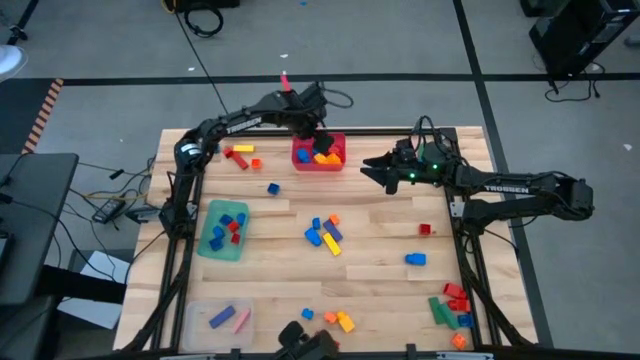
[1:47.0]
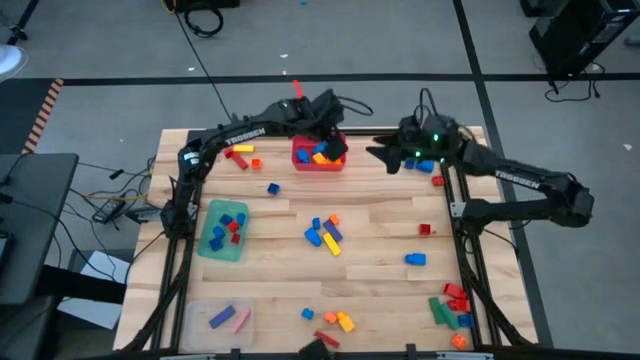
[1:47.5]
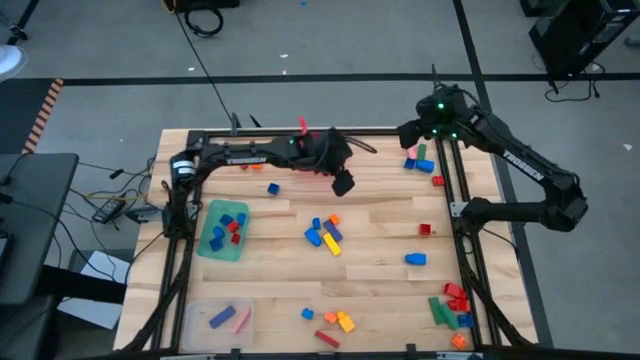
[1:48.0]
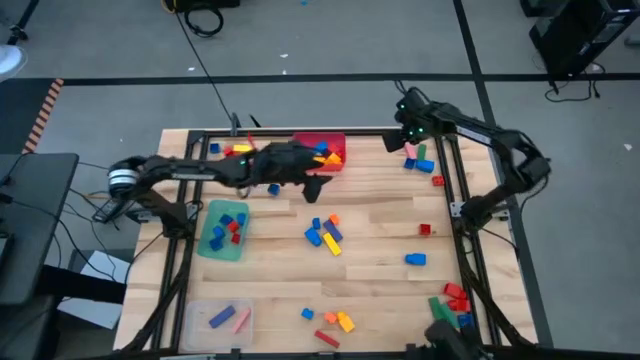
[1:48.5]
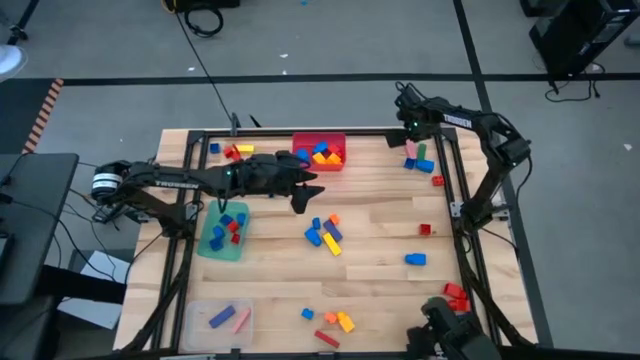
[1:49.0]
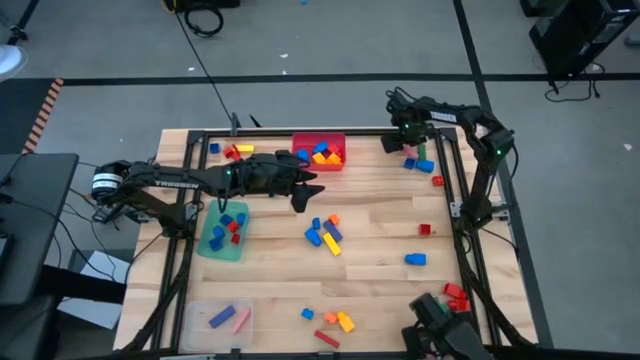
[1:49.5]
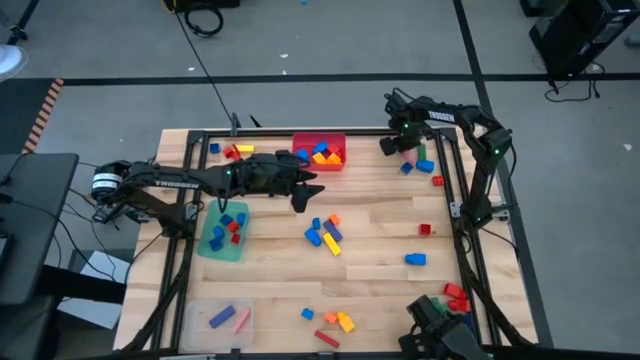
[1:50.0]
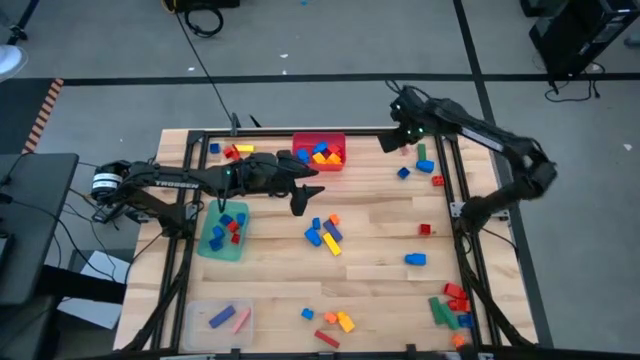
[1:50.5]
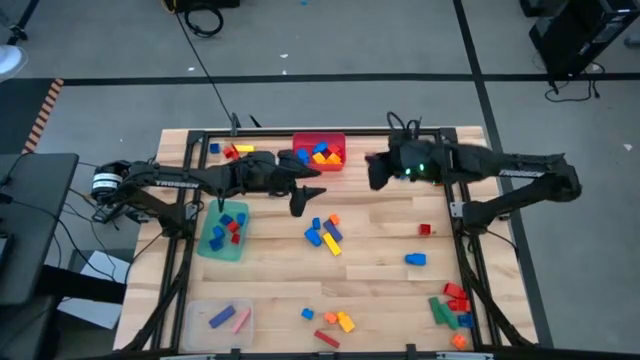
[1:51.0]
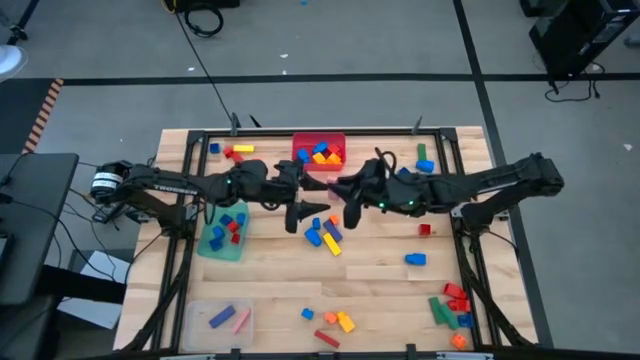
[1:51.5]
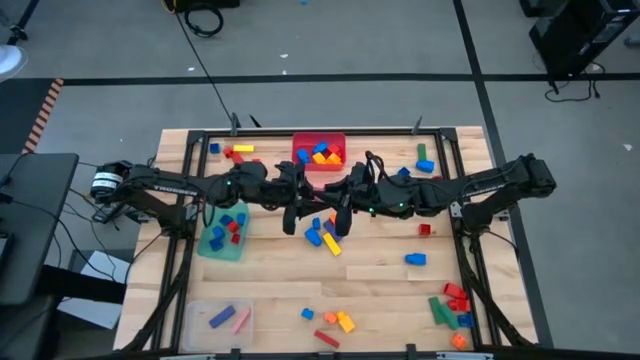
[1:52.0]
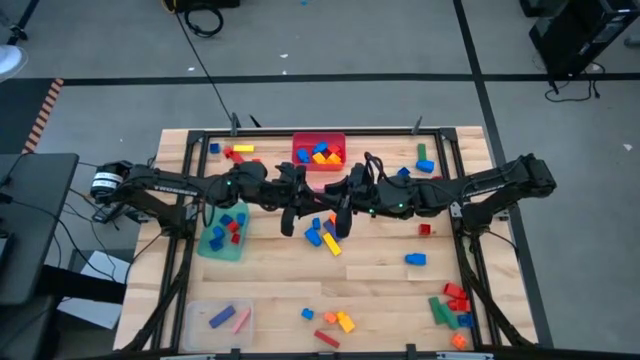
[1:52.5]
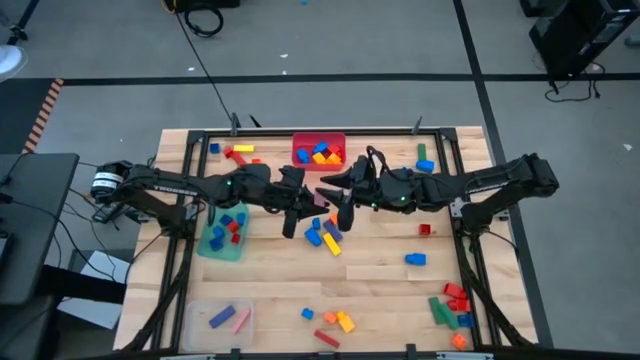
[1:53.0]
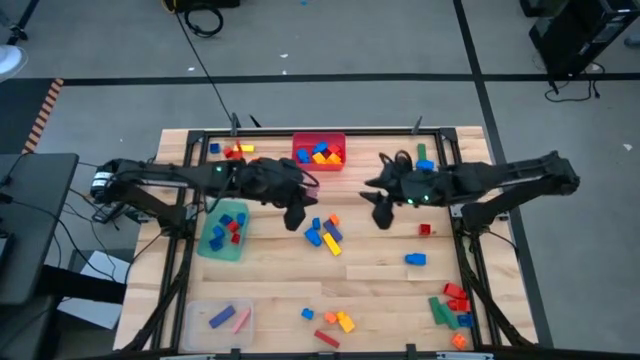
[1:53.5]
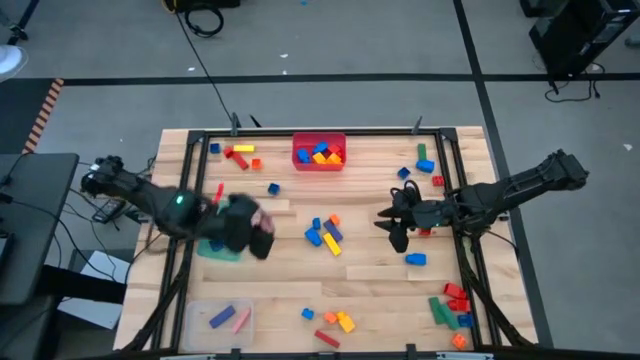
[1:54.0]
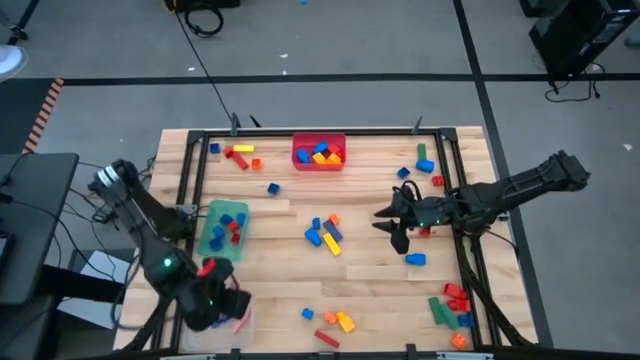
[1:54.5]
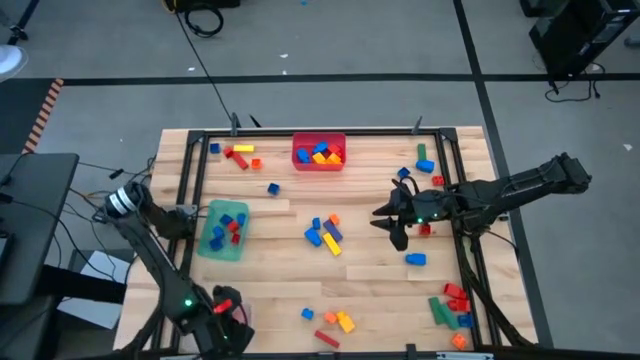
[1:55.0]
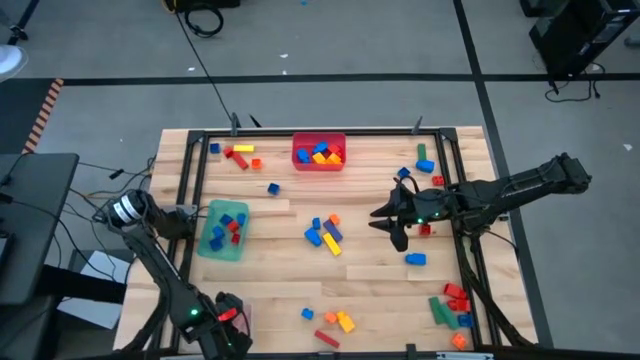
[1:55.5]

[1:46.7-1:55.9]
Task: Sort blocks by size
Put the pink rectangle block into the transparent bin

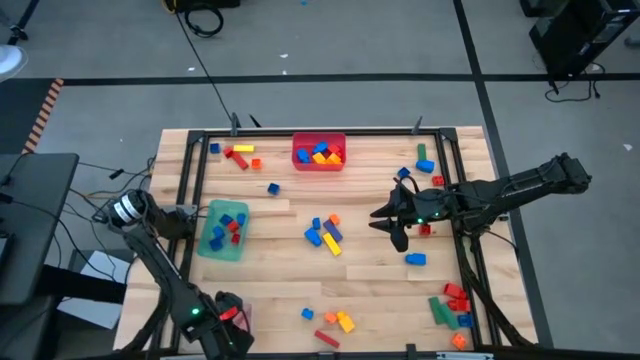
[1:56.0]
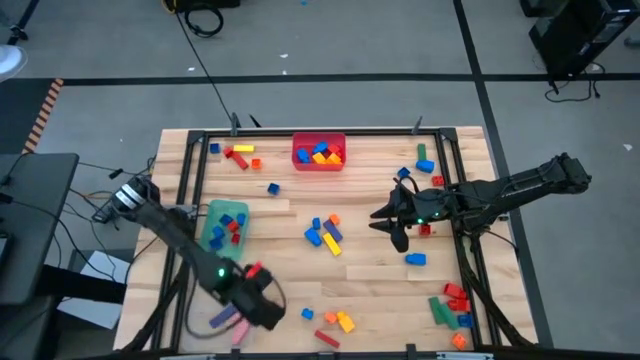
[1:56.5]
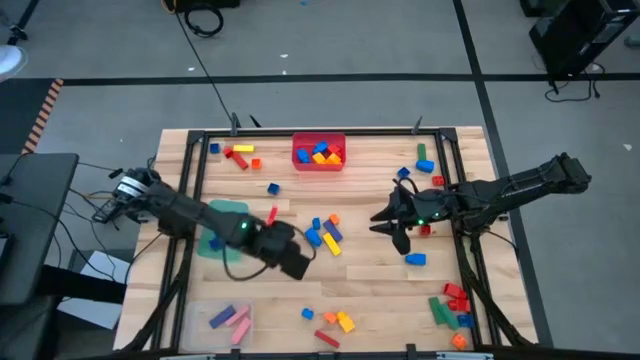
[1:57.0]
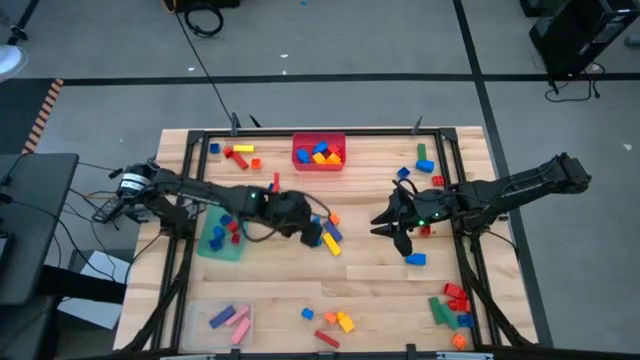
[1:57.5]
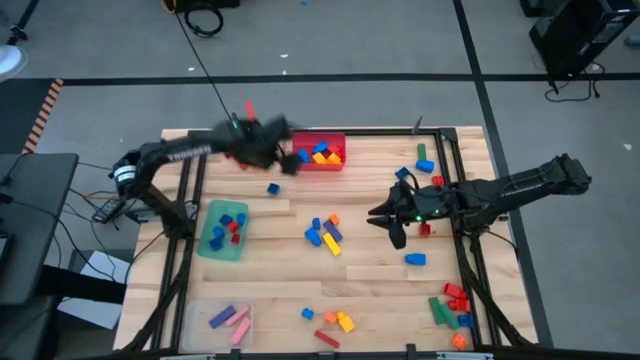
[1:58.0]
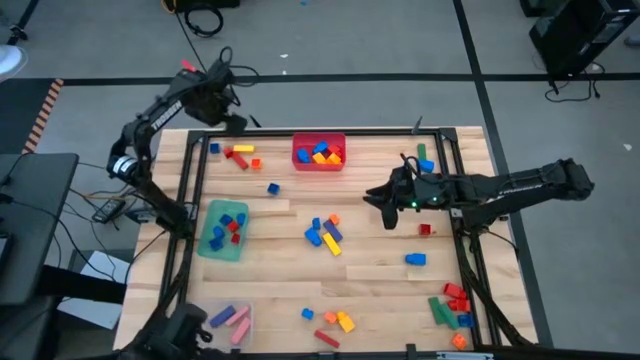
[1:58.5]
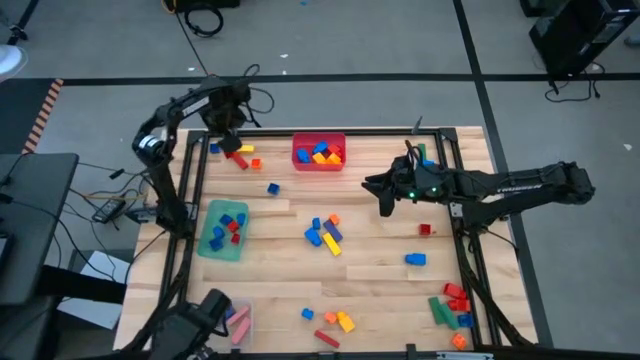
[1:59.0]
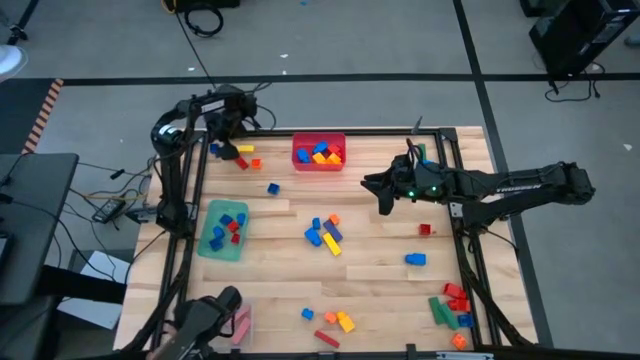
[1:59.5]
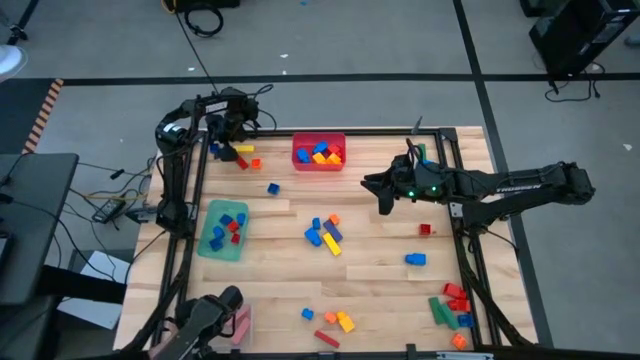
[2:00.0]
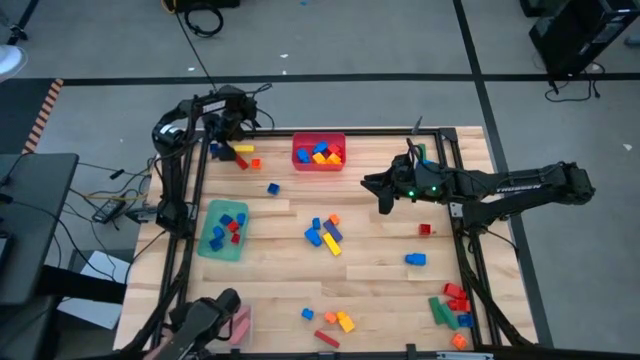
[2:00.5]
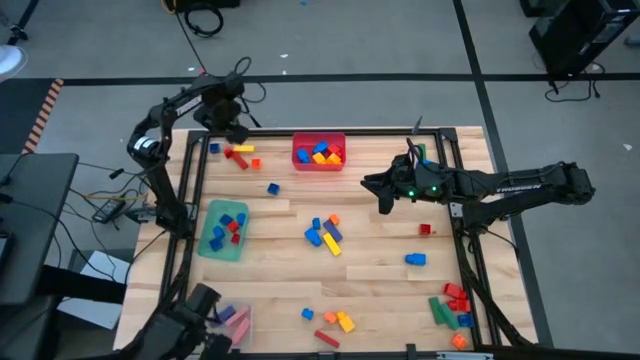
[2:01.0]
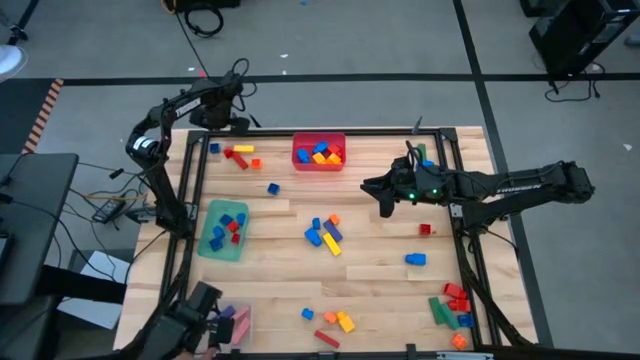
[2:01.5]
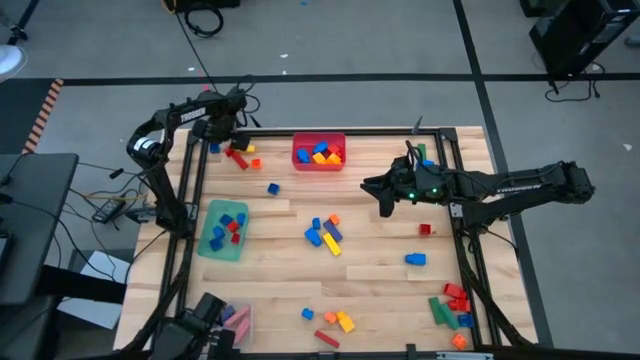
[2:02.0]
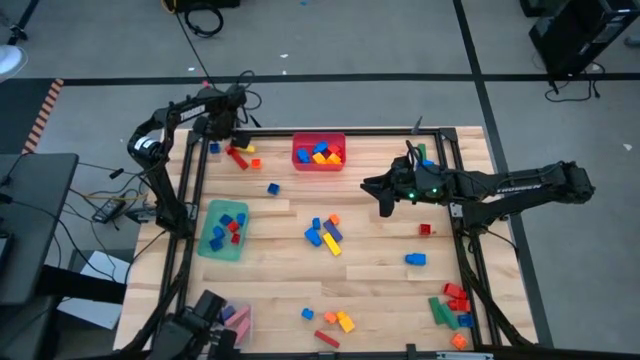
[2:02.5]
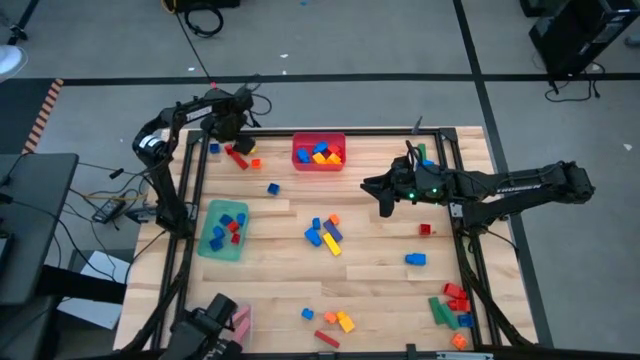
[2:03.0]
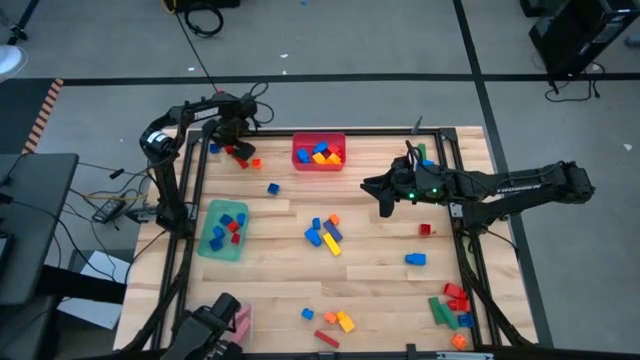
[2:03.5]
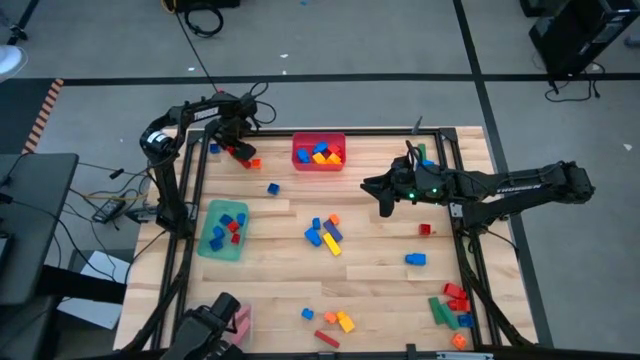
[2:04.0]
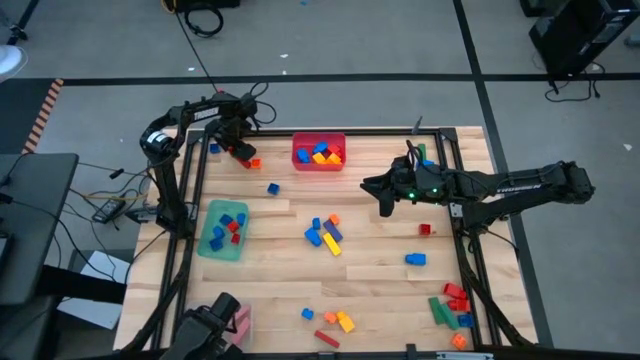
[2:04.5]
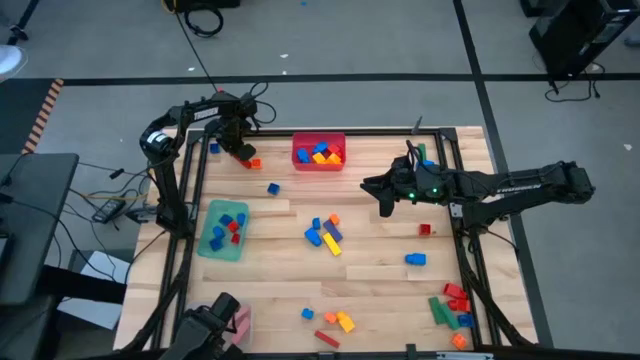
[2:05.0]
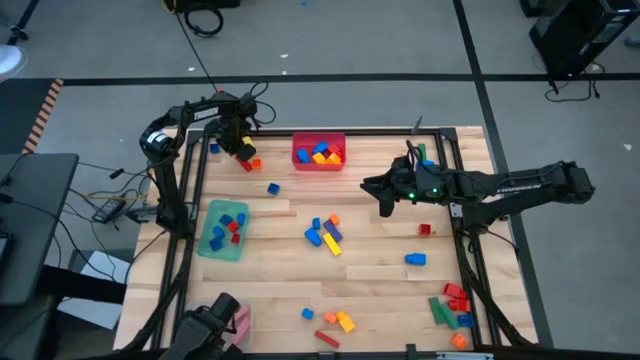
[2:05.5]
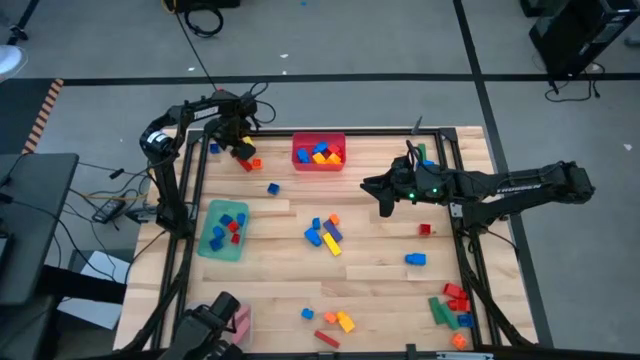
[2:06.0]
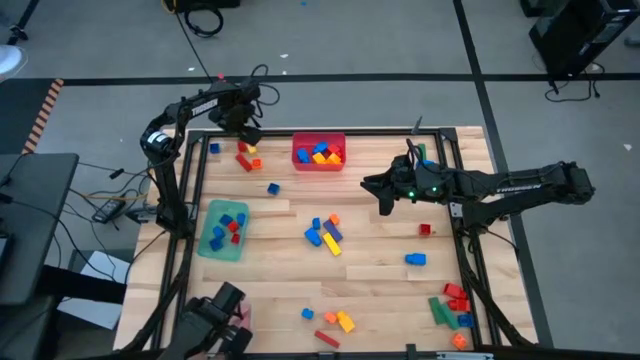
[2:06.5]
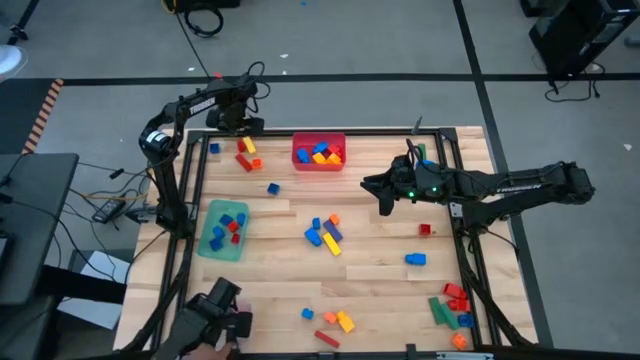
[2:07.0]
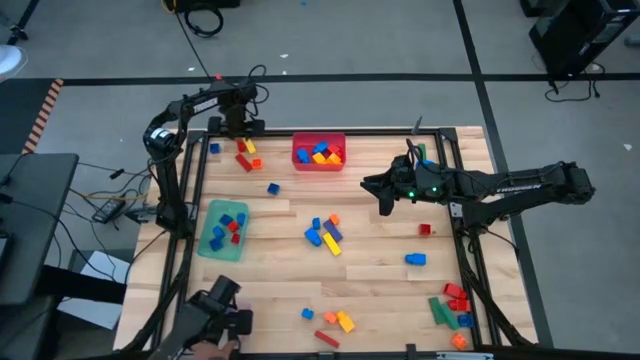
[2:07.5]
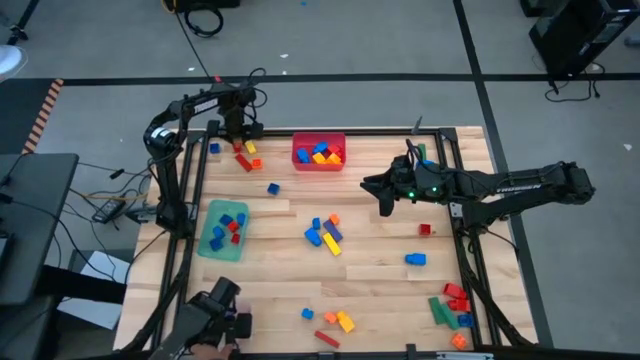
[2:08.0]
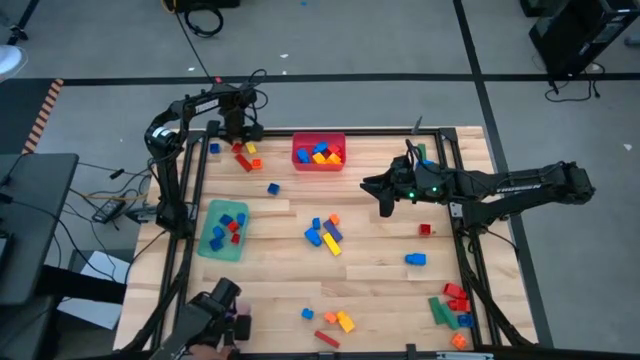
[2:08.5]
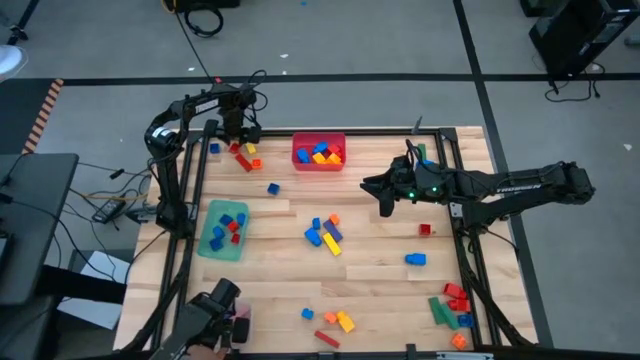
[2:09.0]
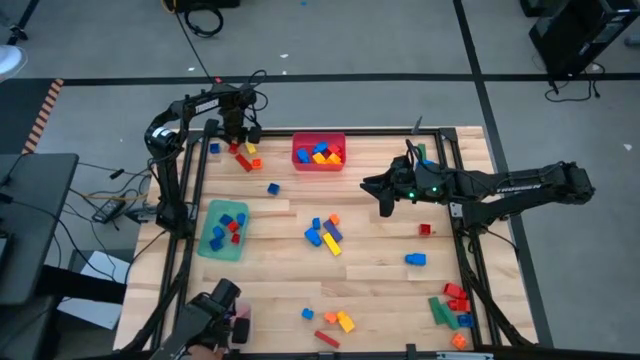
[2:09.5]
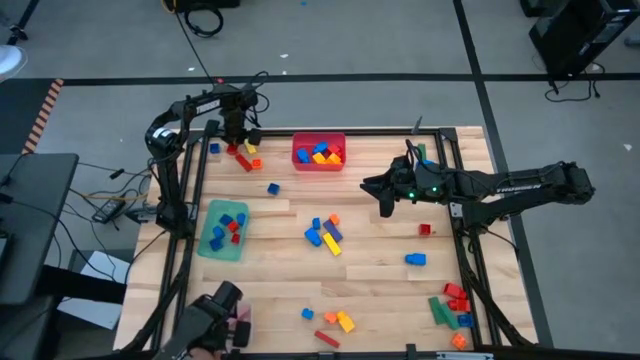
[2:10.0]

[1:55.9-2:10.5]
Put the red 4 studded building block into the teal bin
